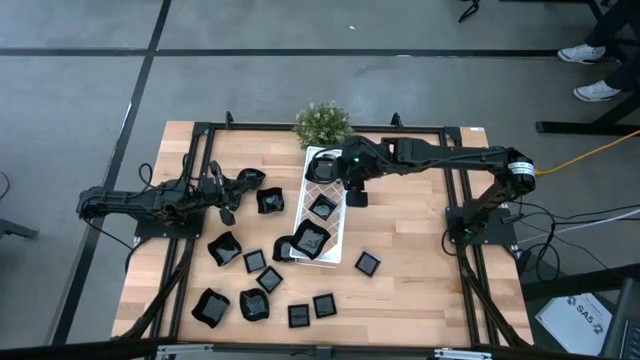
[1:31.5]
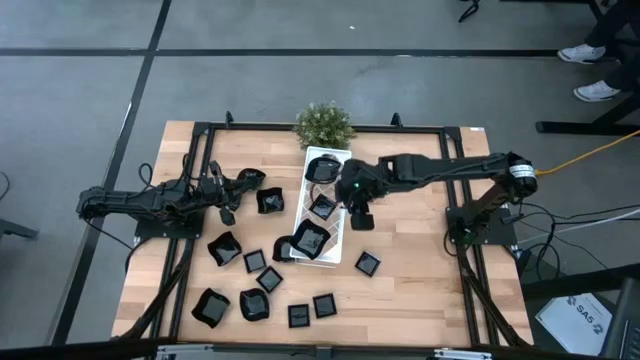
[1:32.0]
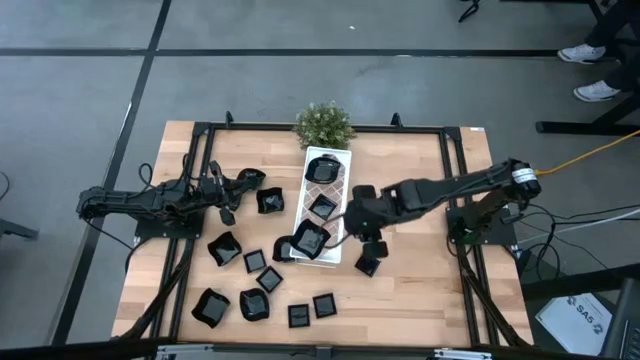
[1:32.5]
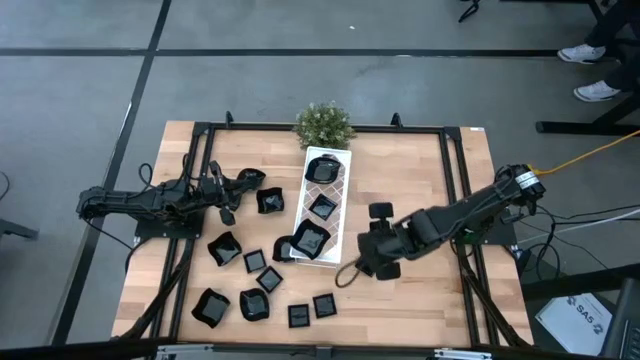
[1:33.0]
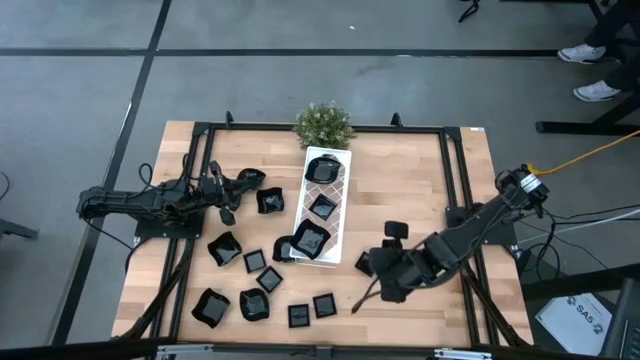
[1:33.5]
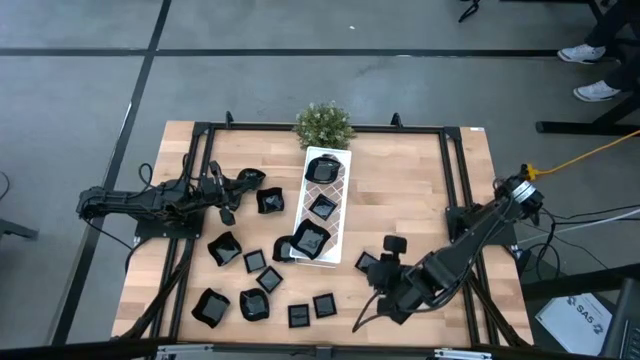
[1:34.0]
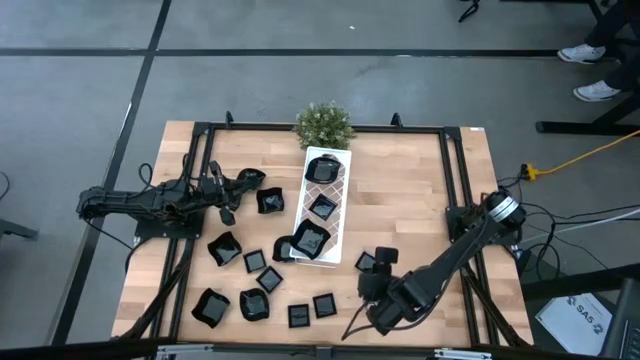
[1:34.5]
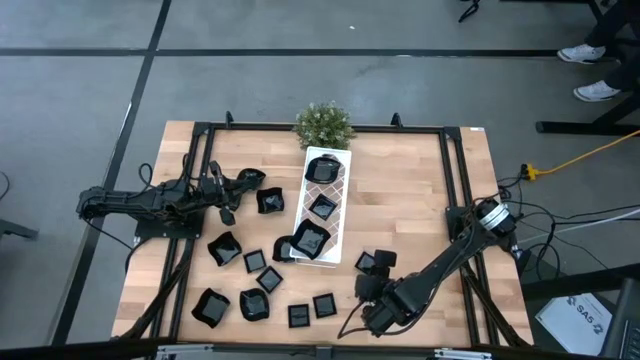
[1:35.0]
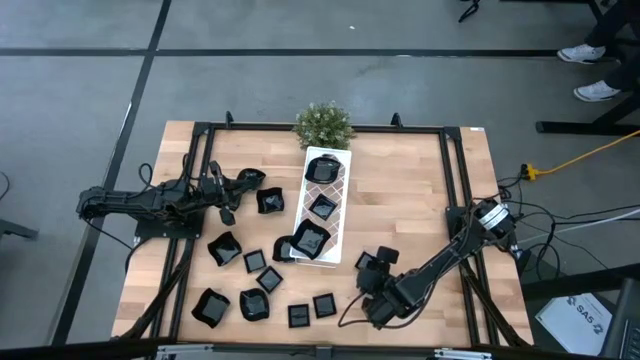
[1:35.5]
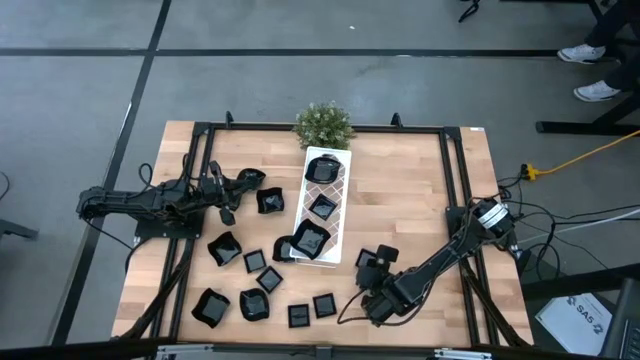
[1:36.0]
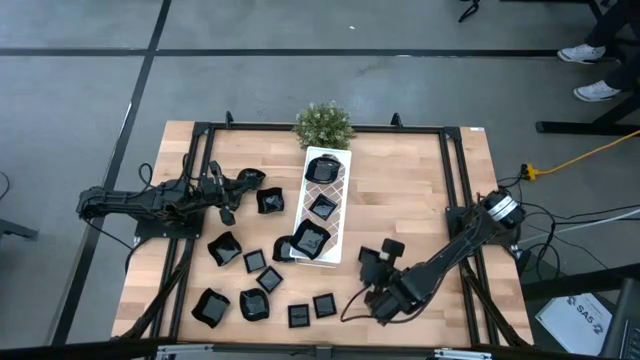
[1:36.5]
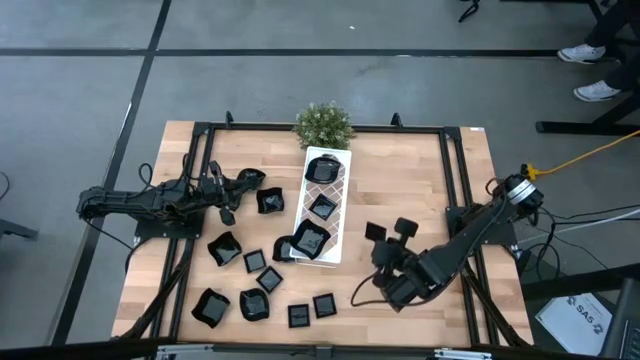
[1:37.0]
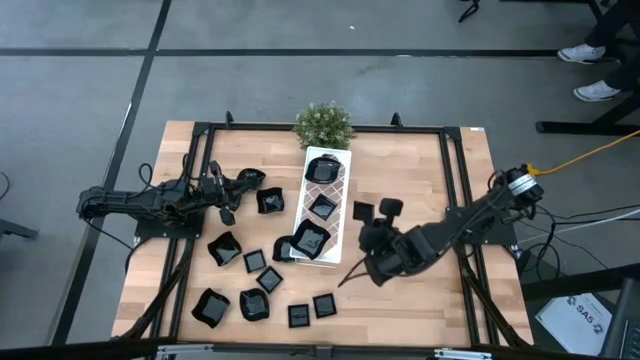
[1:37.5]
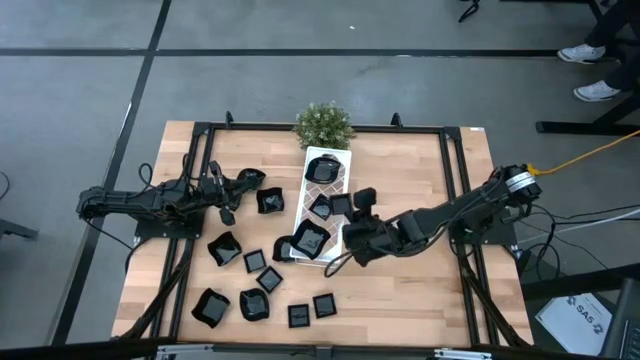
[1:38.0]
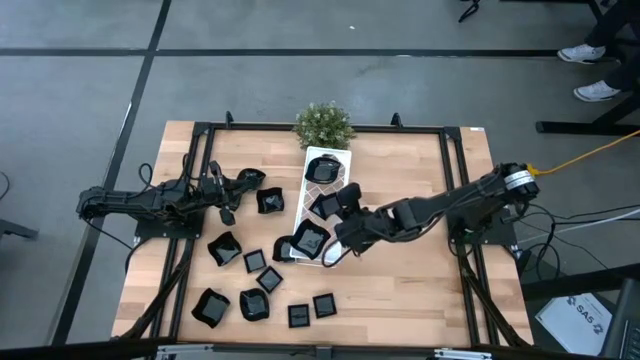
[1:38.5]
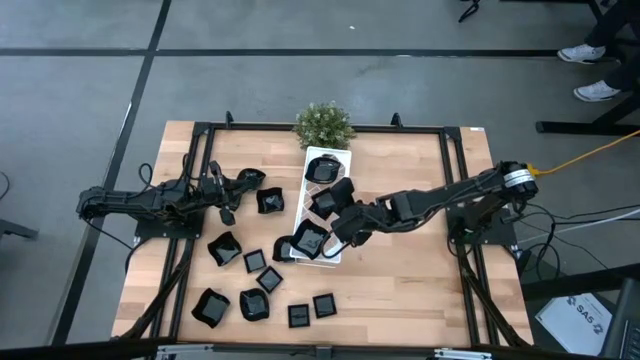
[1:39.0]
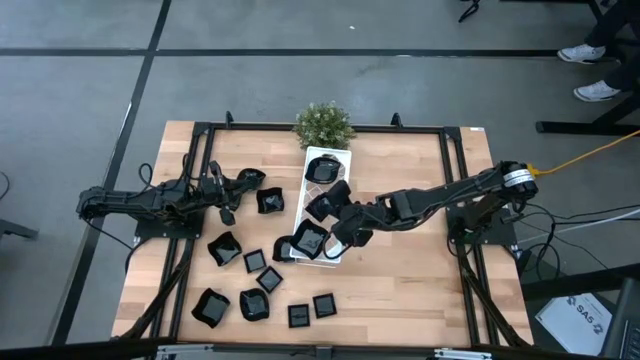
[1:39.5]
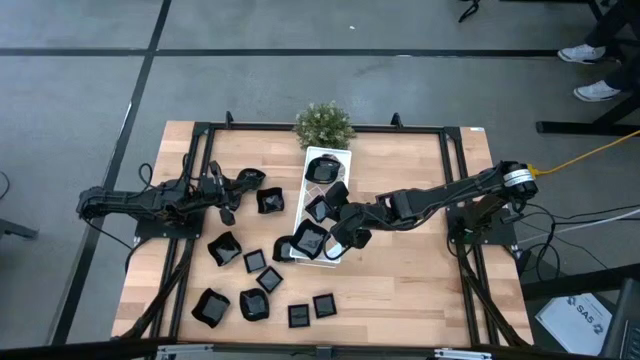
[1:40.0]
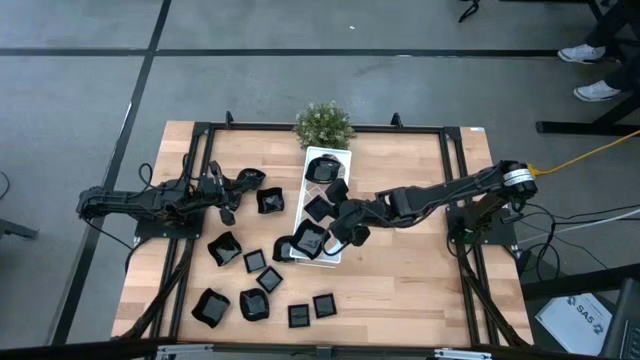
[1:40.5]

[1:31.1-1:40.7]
Task: Pick & Place Mini shaped plates
Stack the square plate on top of the square plate on the shelf

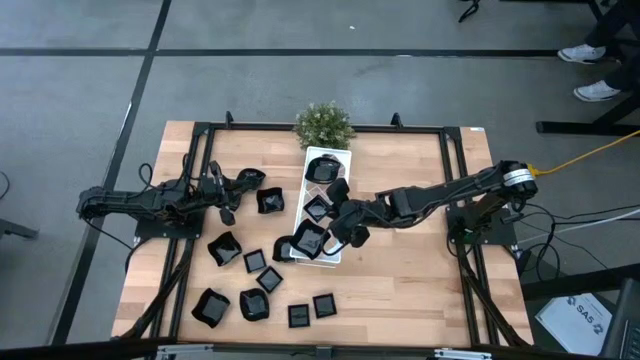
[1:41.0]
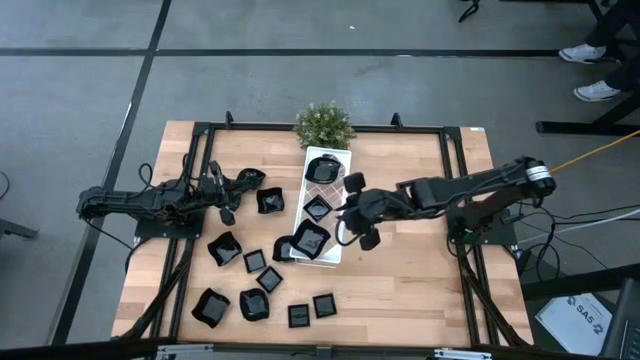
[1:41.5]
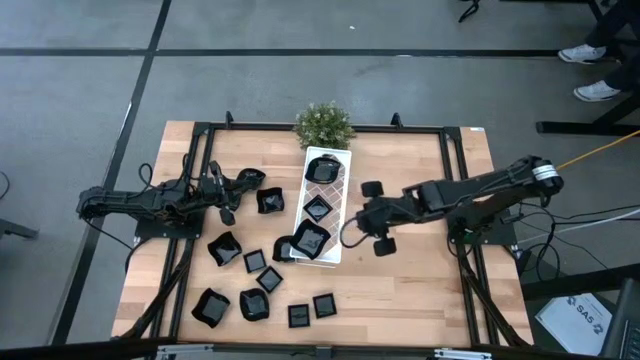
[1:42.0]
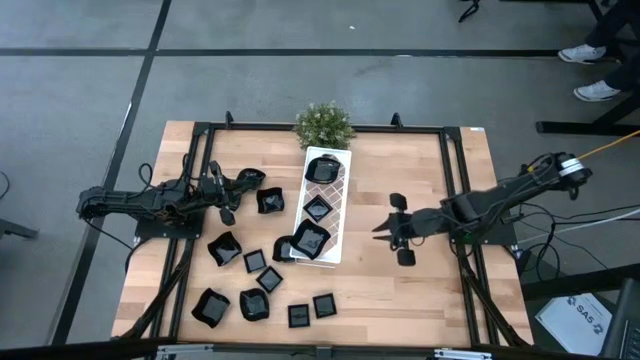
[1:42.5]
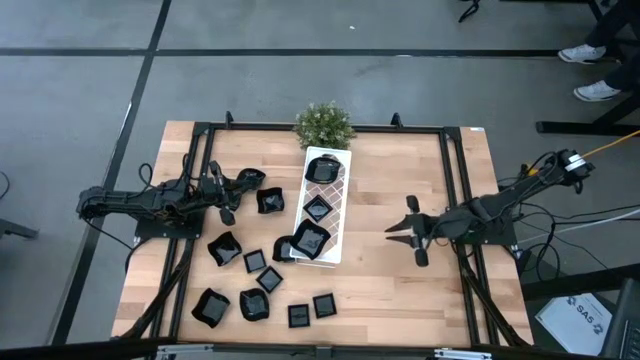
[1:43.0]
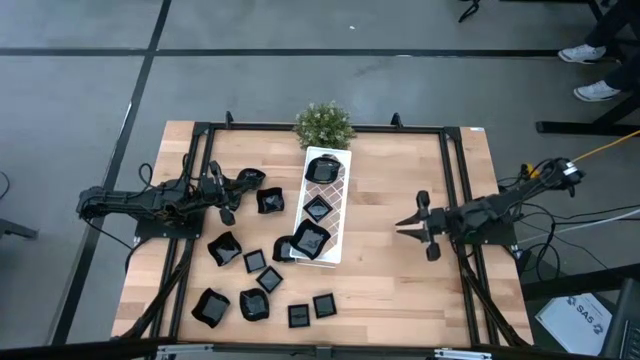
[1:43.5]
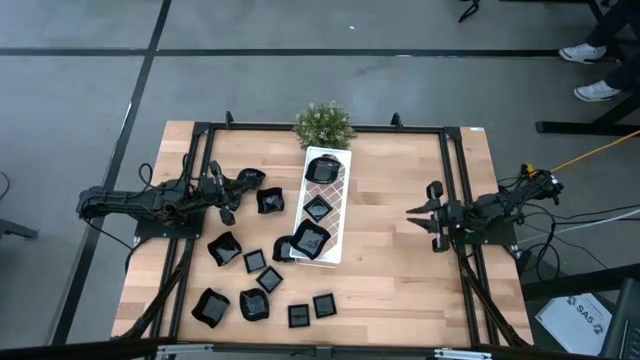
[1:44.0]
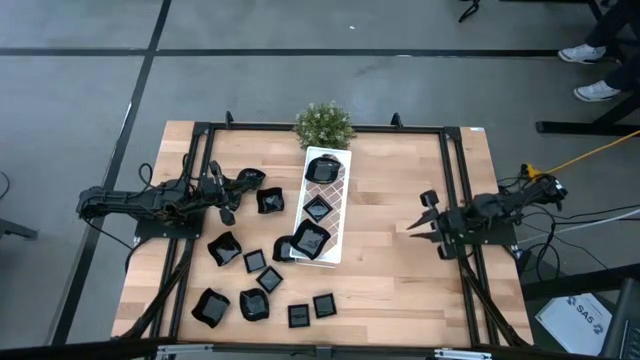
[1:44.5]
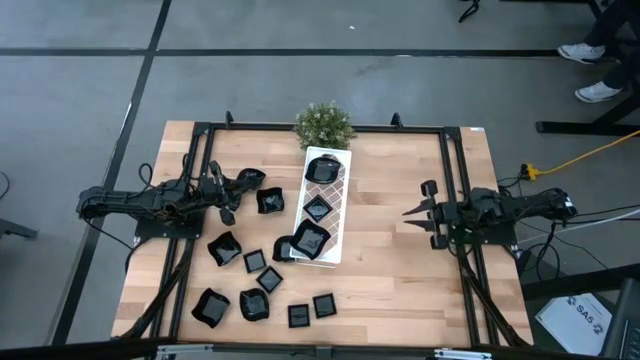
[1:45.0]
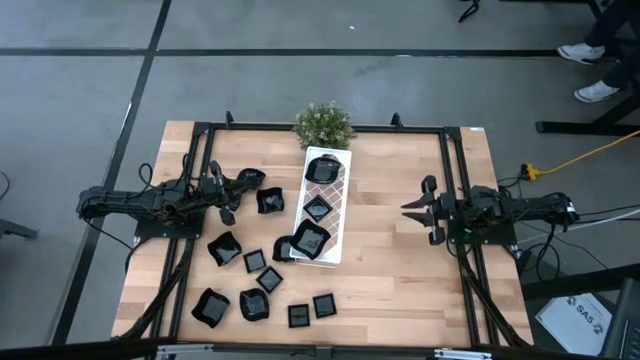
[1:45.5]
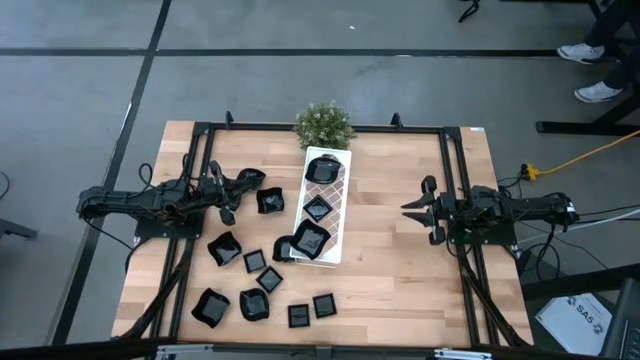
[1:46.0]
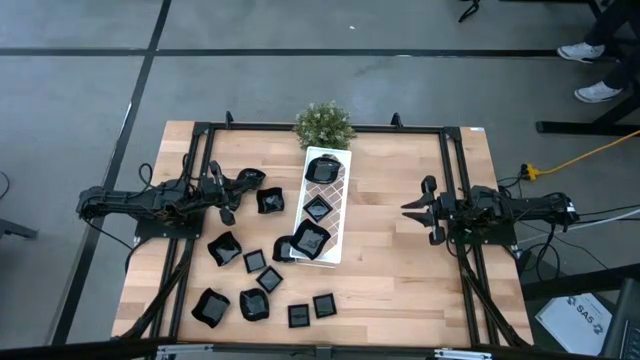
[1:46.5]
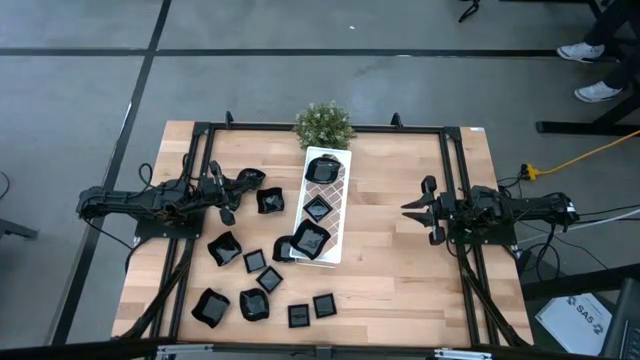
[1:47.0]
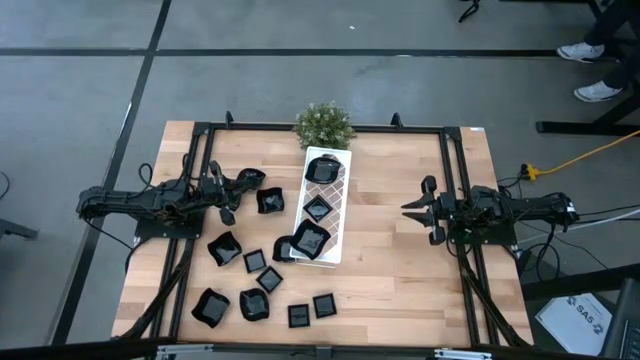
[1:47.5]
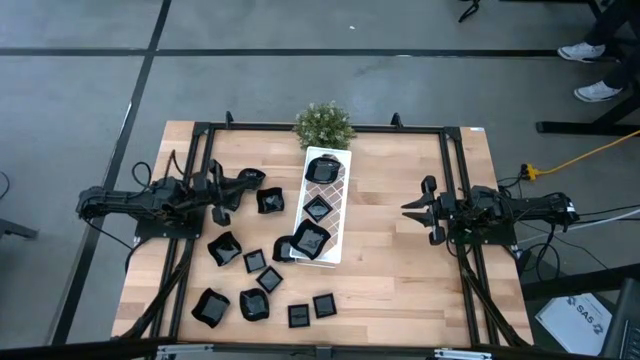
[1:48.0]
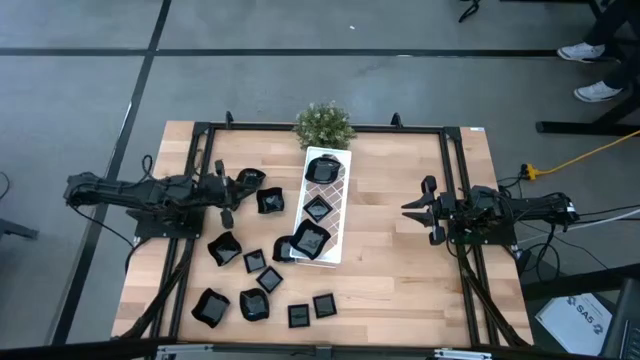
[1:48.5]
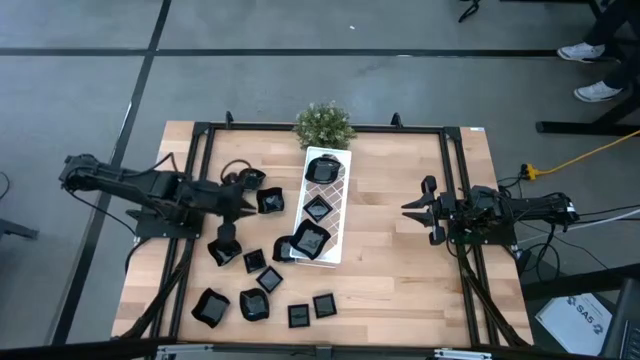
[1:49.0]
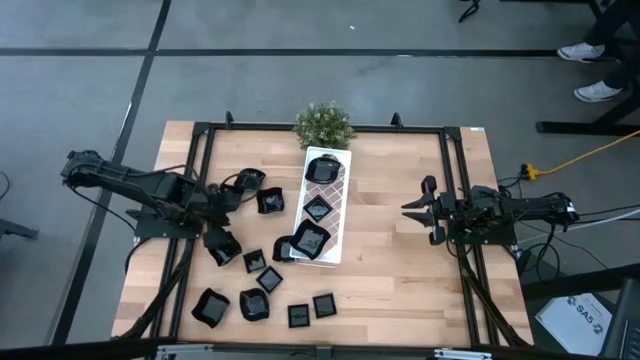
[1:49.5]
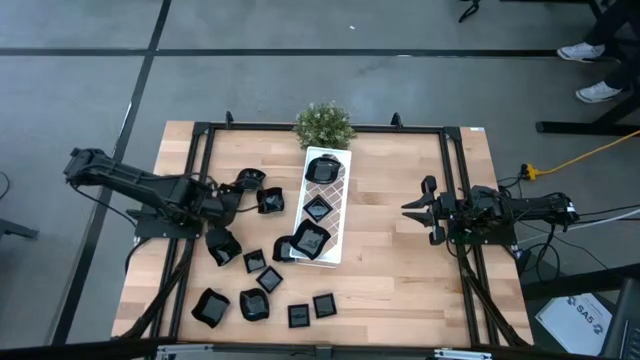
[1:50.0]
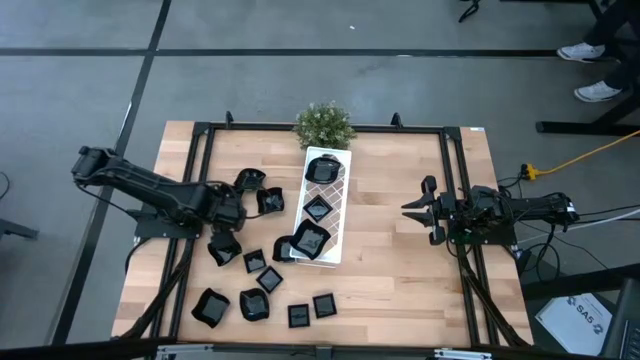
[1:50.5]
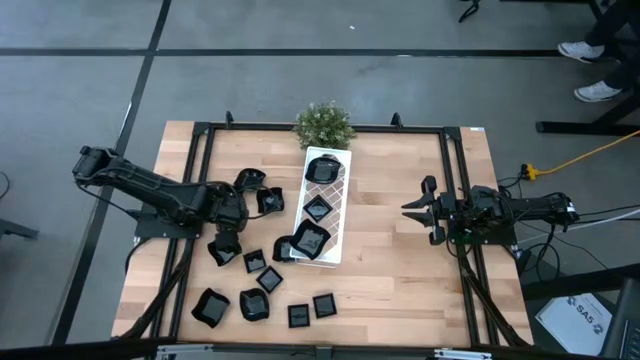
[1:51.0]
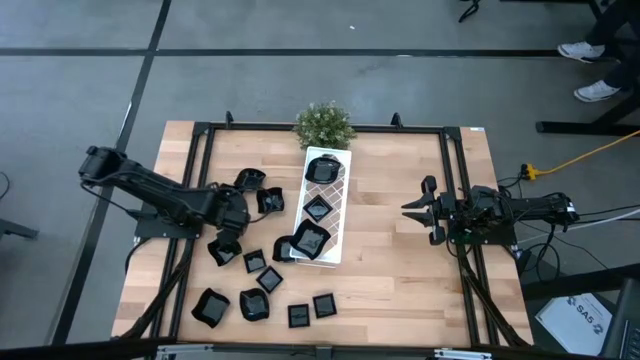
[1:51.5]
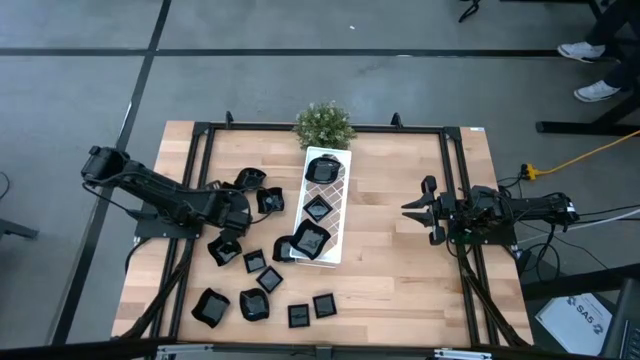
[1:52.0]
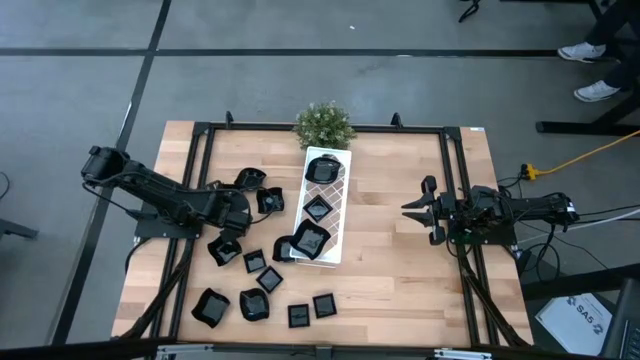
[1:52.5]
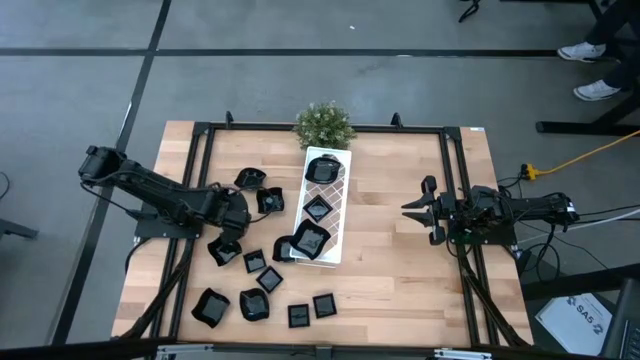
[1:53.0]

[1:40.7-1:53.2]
Stack the distorted square plate on top of the distorted square plate on the shelf
